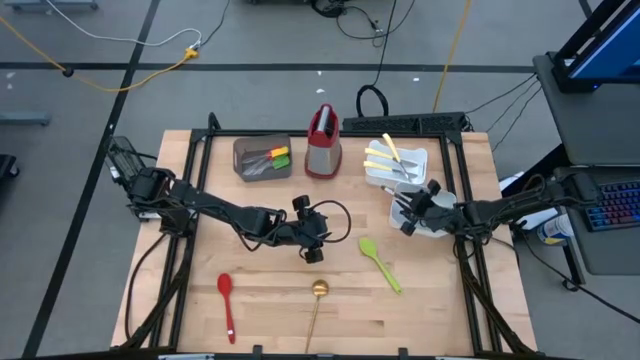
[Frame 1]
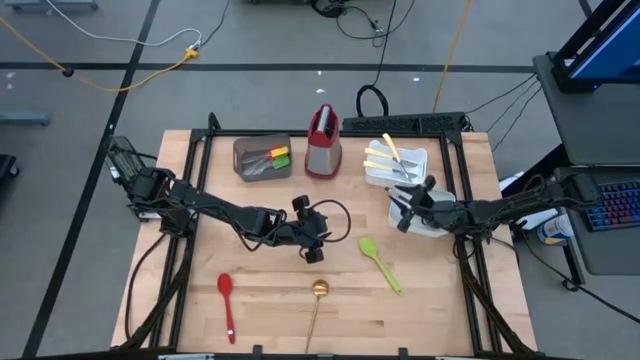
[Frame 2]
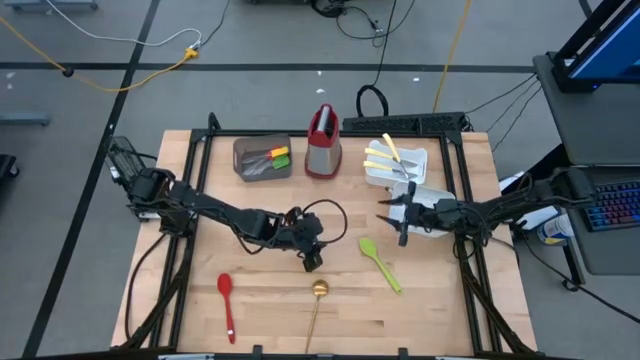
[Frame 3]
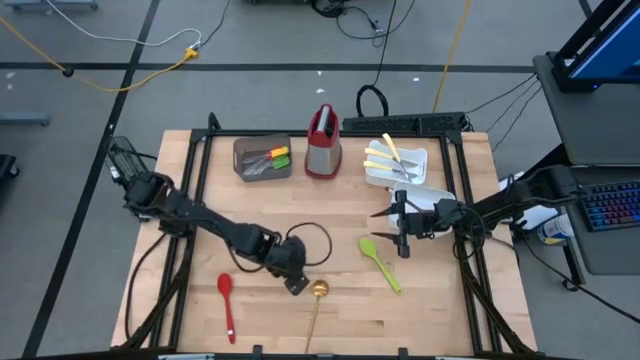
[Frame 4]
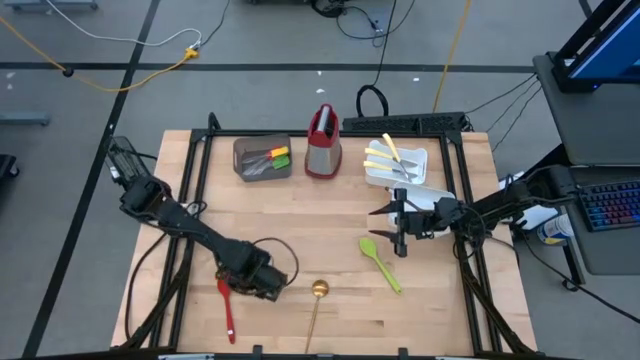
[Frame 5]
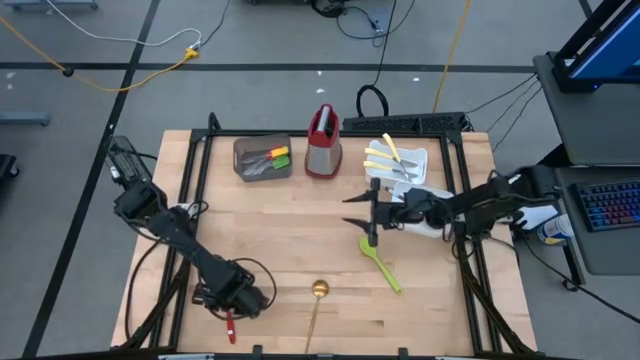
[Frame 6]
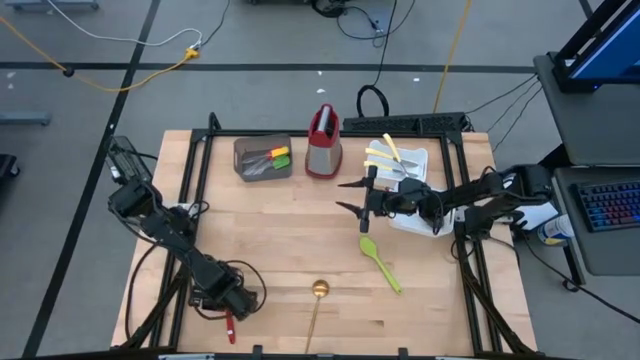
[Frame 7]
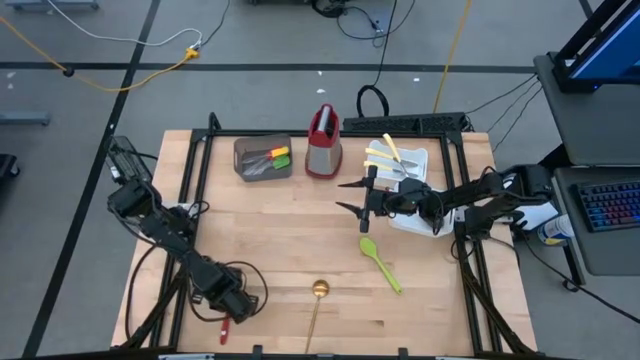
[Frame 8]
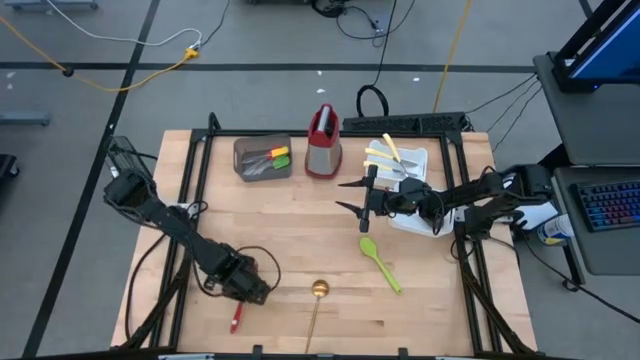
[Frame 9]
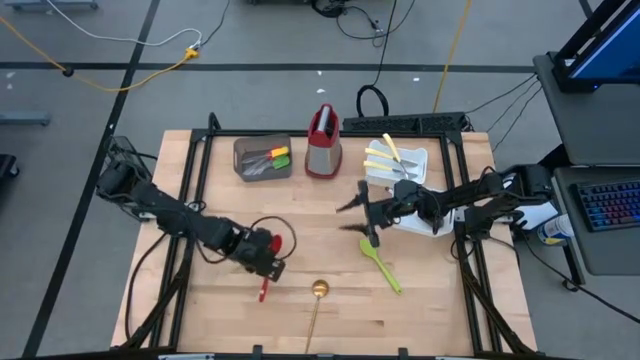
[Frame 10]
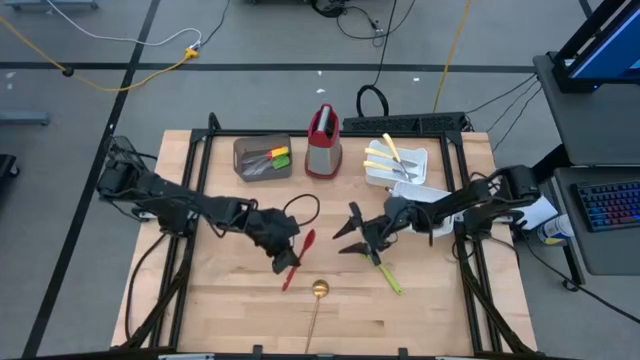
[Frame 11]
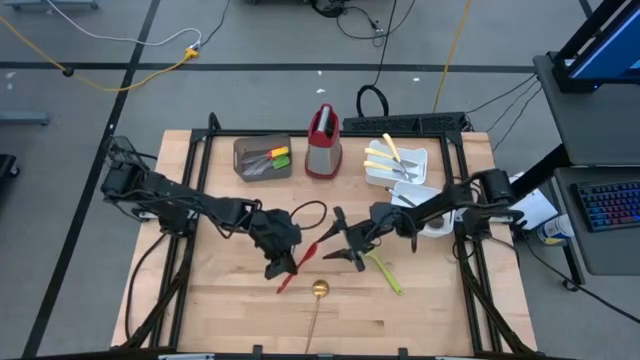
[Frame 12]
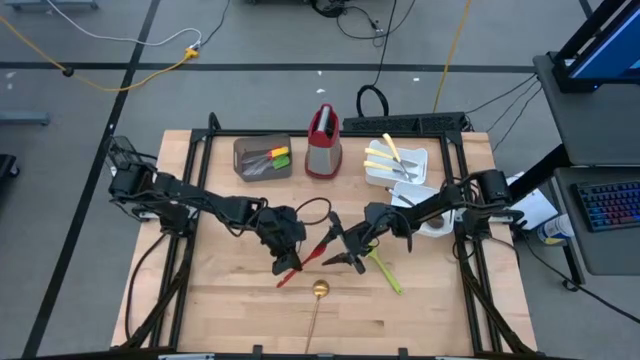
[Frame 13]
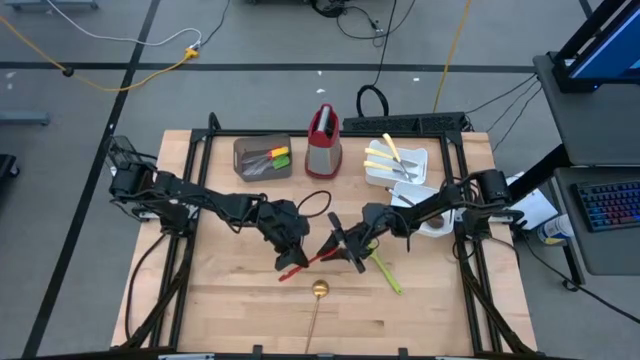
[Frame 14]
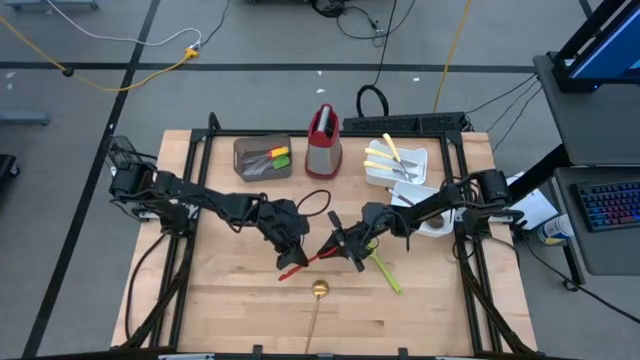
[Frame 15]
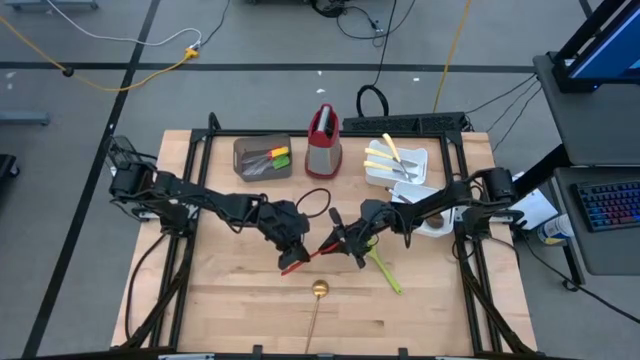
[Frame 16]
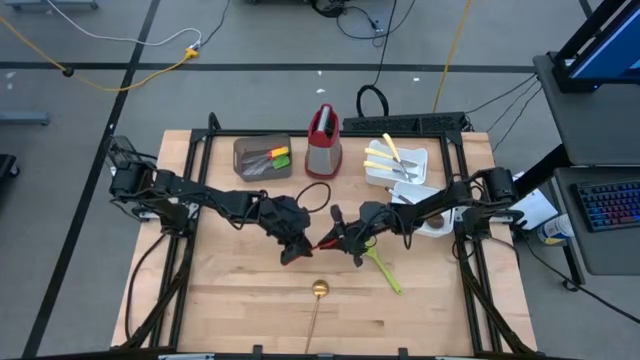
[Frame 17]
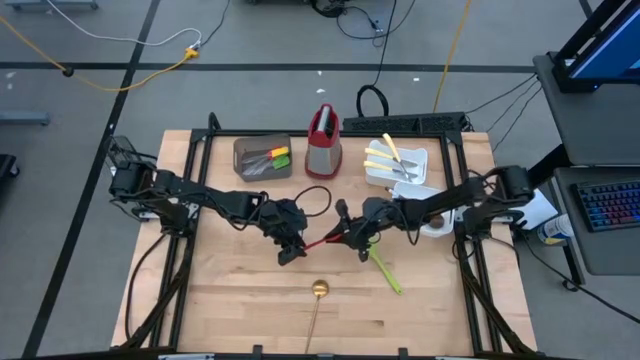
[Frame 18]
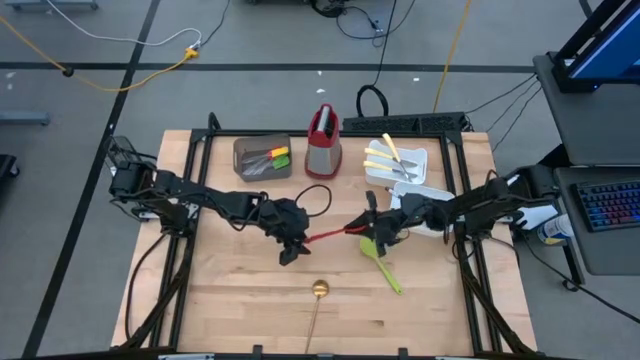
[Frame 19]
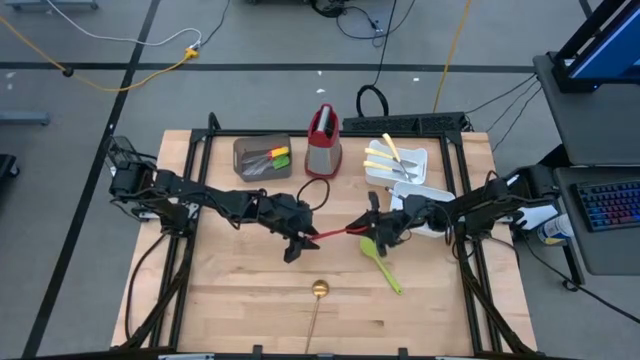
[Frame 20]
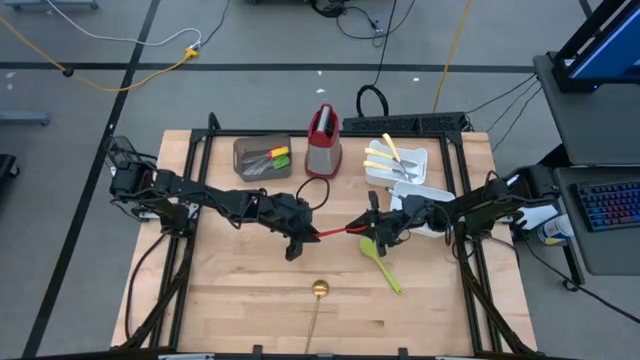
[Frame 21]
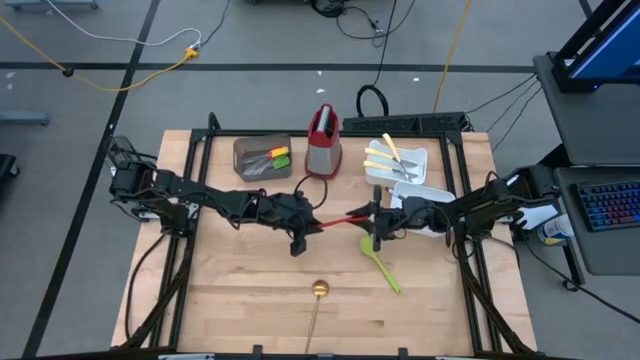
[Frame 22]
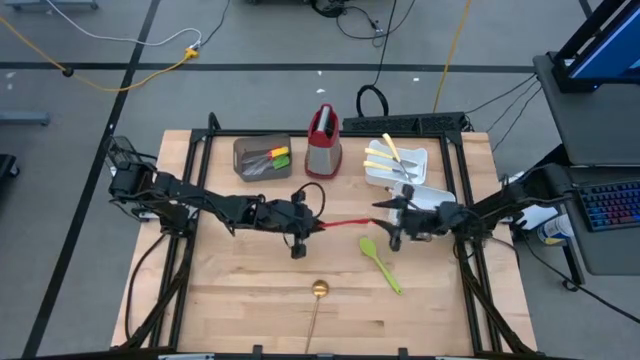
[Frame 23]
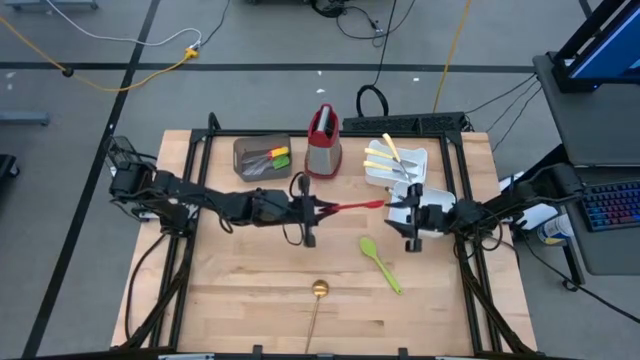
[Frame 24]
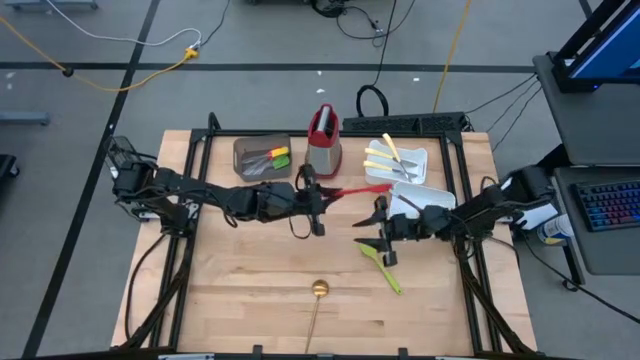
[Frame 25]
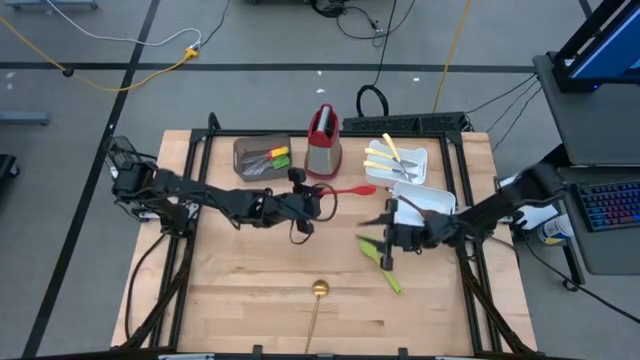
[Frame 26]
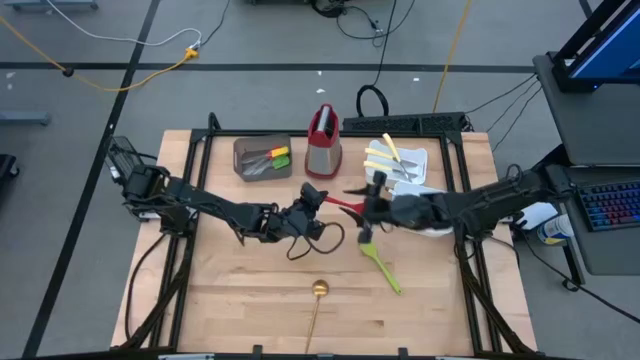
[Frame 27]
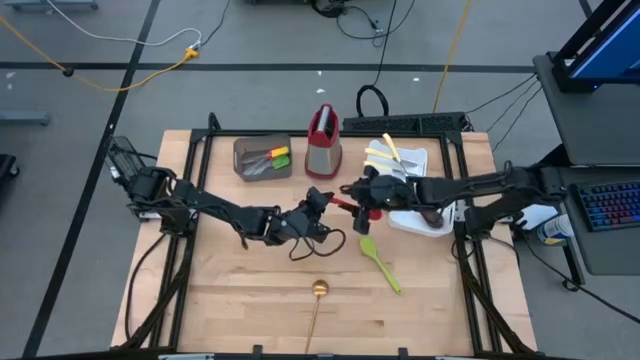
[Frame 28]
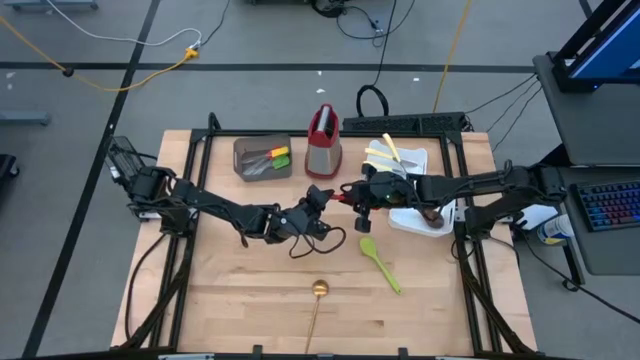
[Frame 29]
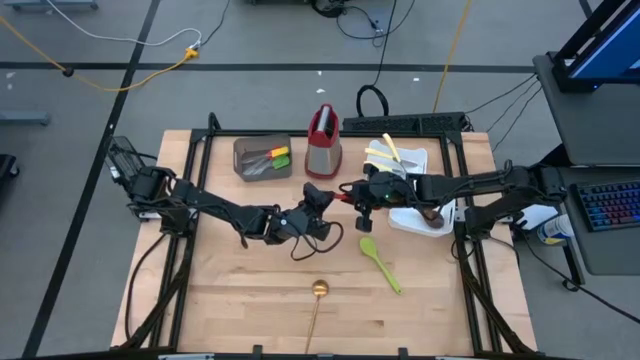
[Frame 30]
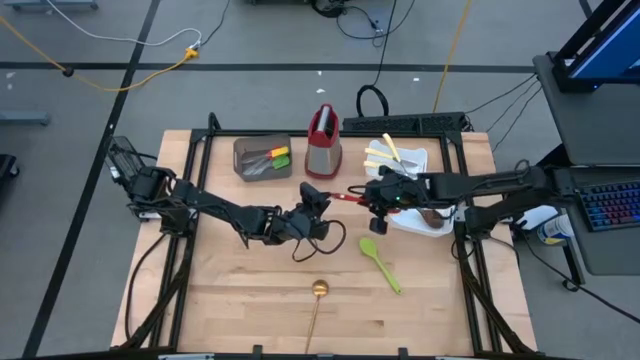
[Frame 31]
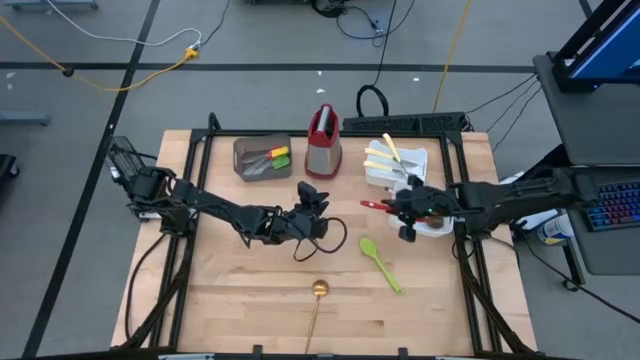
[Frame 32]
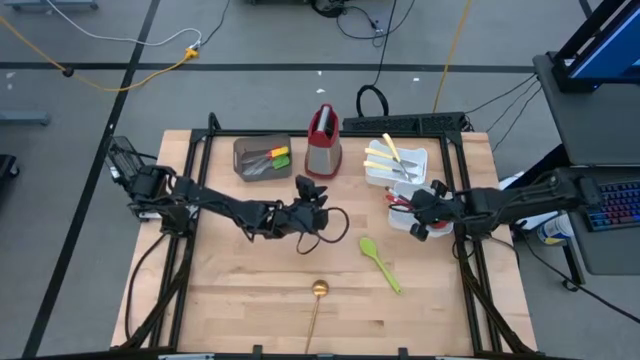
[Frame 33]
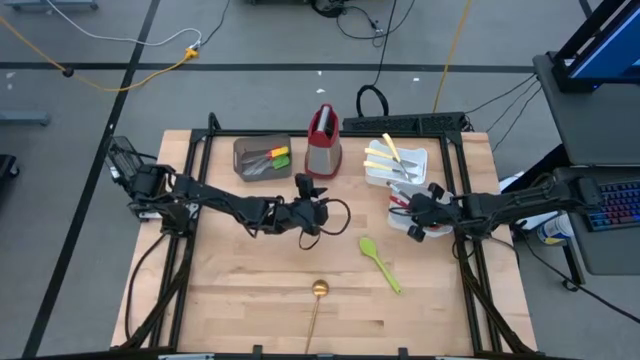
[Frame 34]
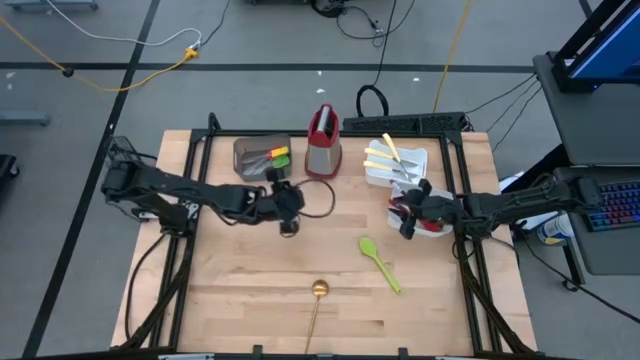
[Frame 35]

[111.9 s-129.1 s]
Task: Pick & Place Kitchen Items
Put the red serving spoon into the bottom white bin

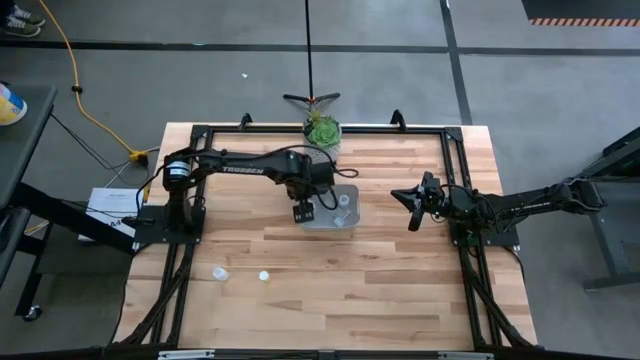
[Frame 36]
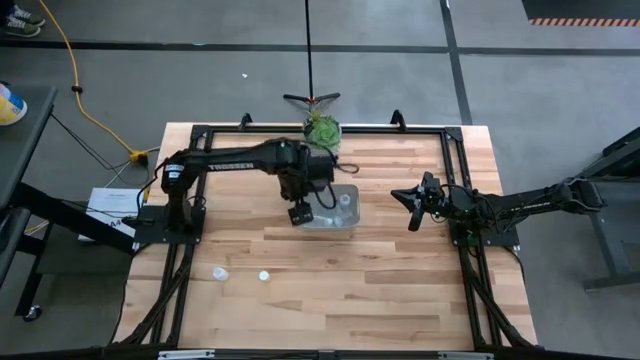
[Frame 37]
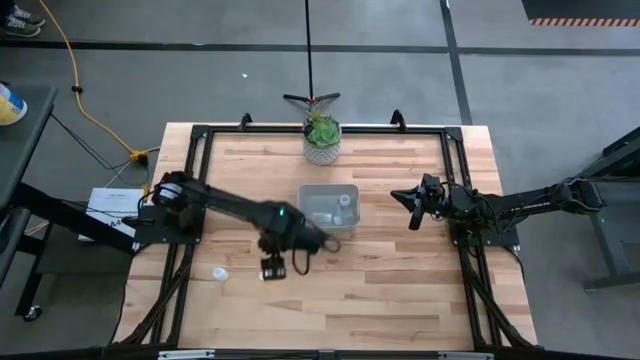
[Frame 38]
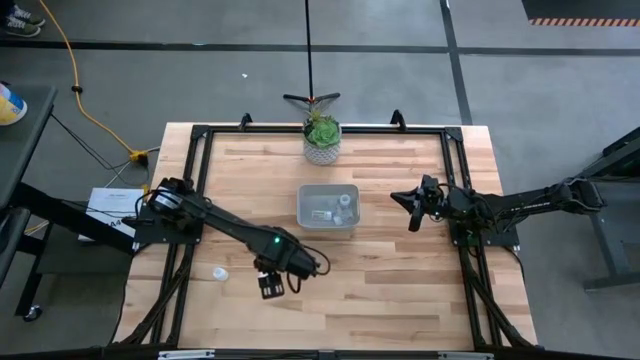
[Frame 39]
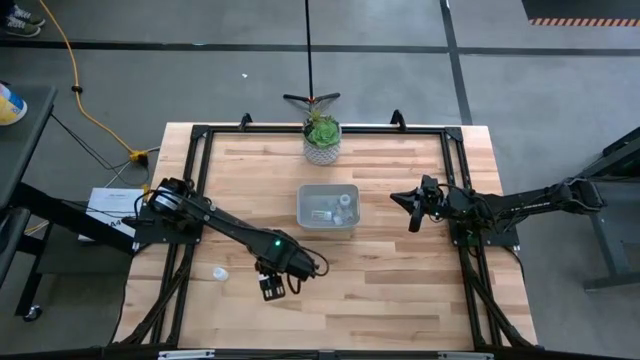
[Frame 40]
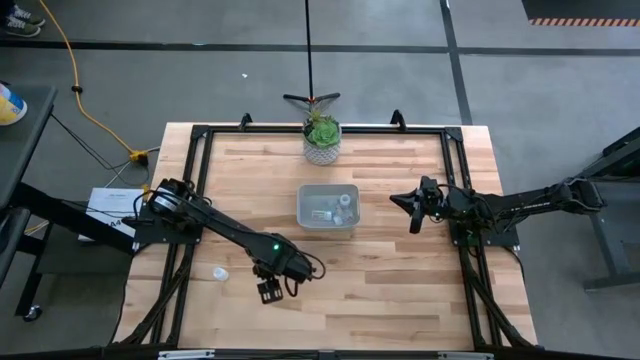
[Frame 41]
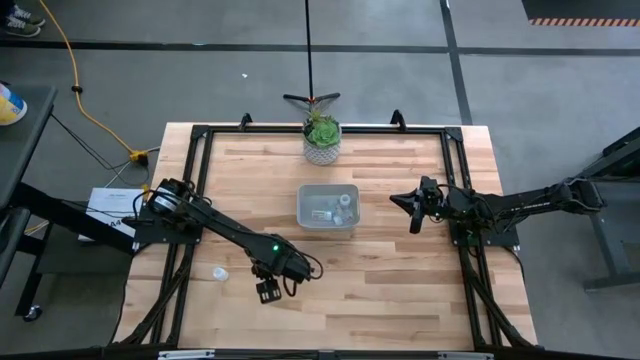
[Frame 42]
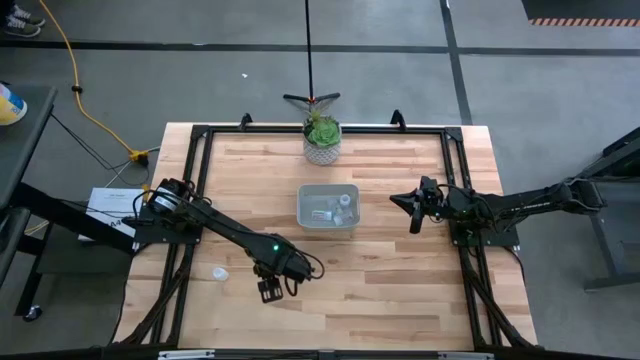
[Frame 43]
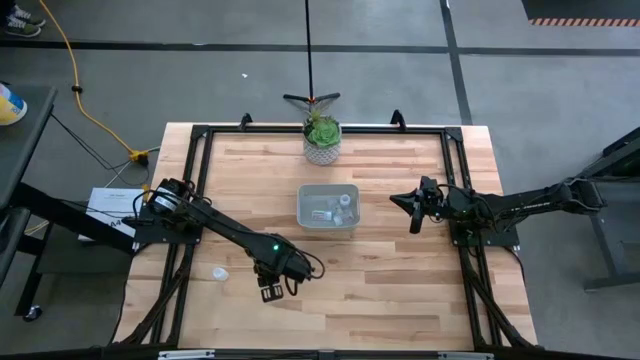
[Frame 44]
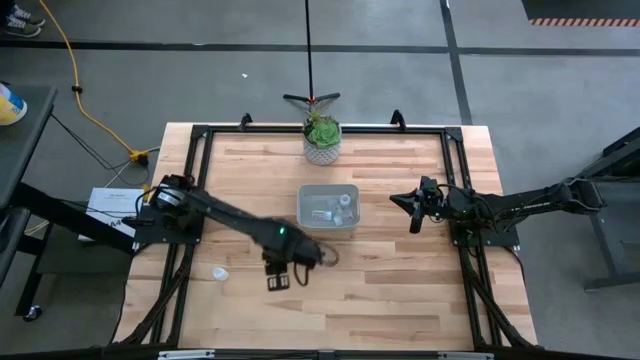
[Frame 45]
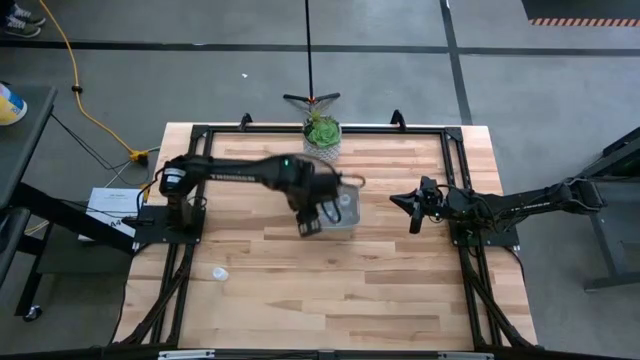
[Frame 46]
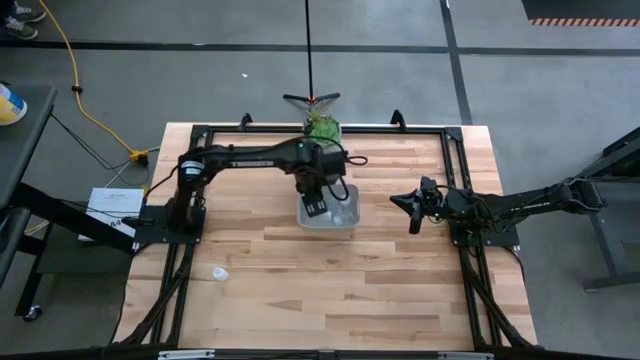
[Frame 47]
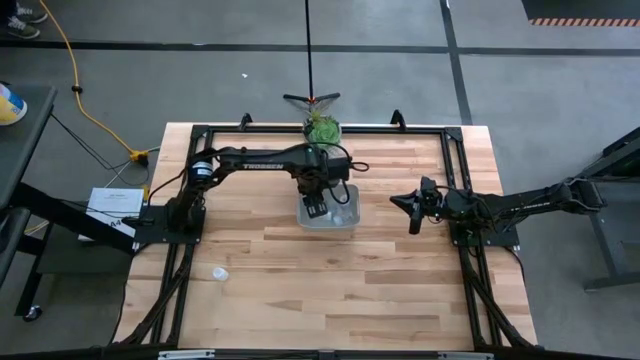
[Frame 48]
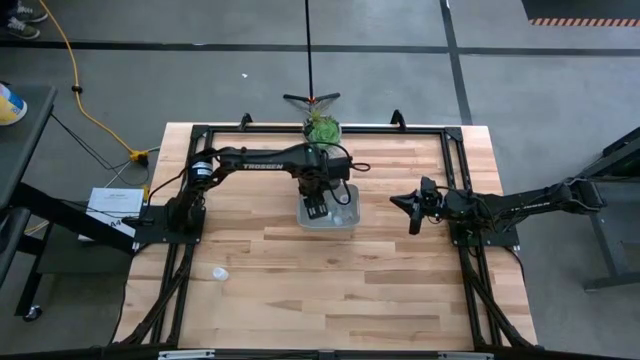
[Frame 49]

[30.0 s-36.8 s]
Task: Pick and place pill bottles into a basket
Put the yellow pill bottle into the gray bin
